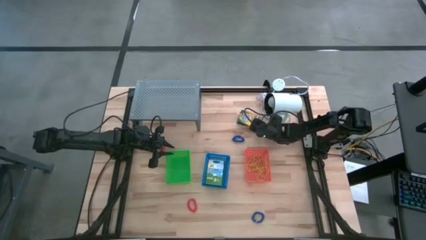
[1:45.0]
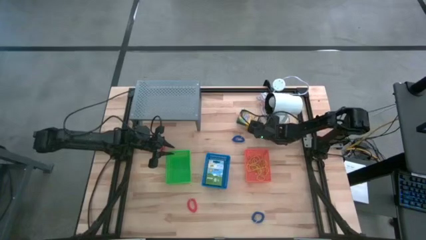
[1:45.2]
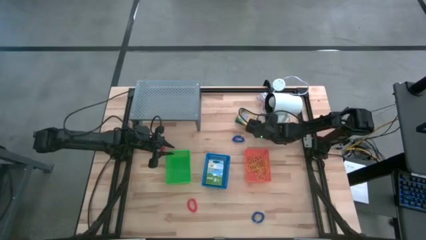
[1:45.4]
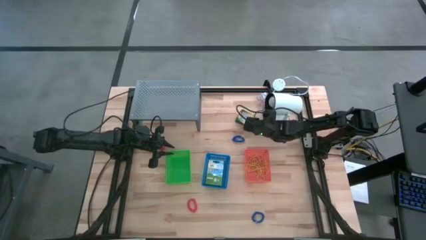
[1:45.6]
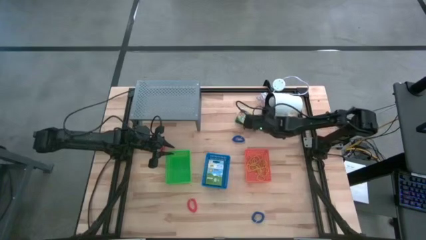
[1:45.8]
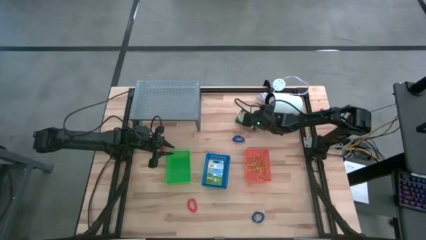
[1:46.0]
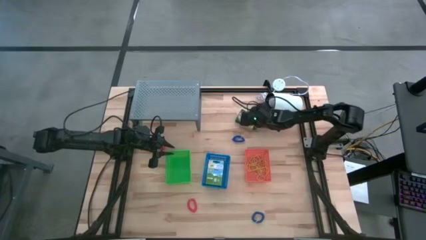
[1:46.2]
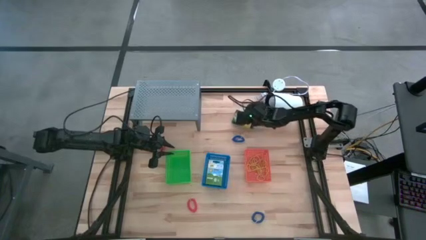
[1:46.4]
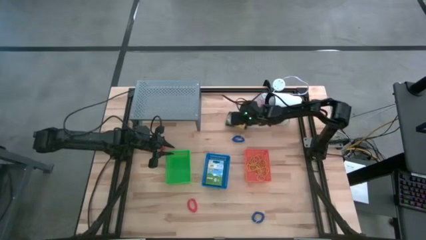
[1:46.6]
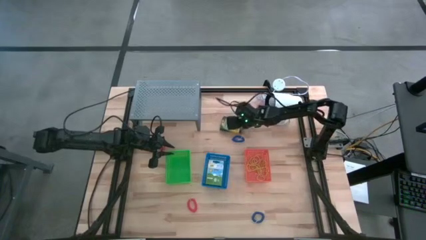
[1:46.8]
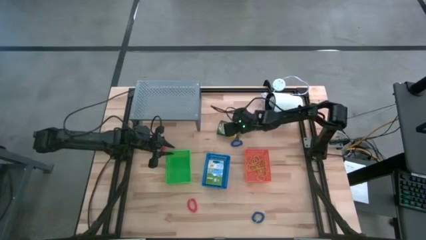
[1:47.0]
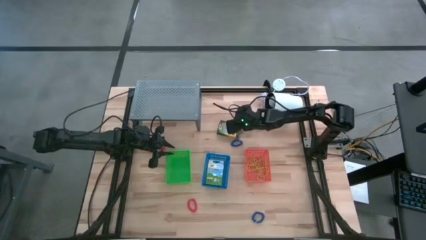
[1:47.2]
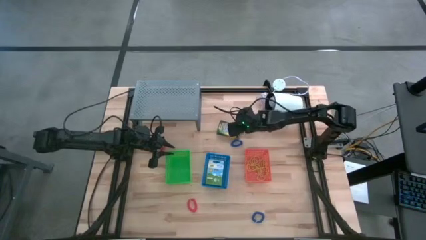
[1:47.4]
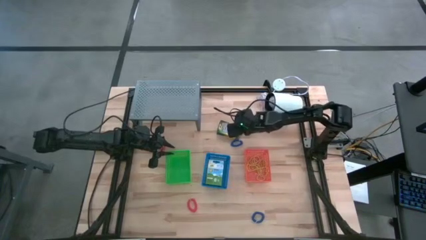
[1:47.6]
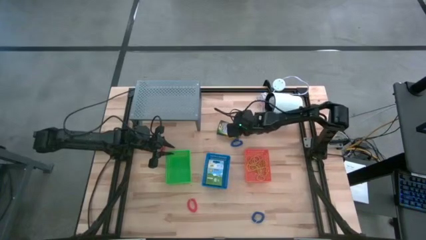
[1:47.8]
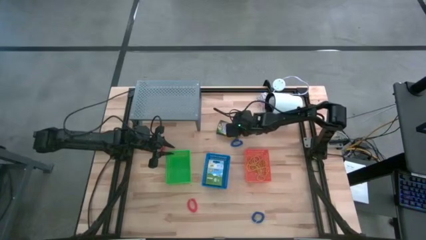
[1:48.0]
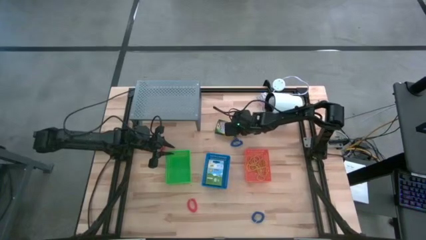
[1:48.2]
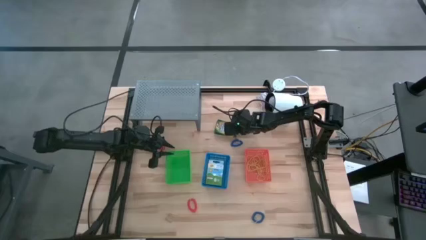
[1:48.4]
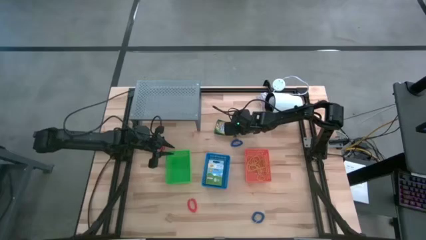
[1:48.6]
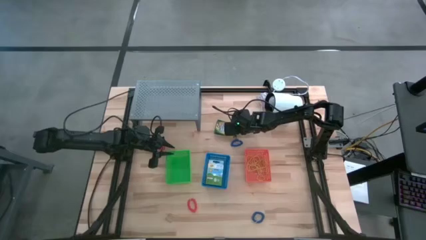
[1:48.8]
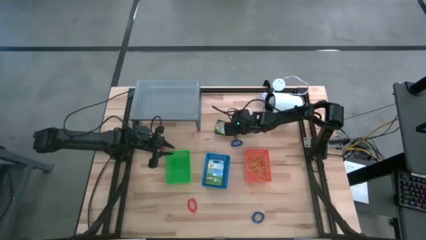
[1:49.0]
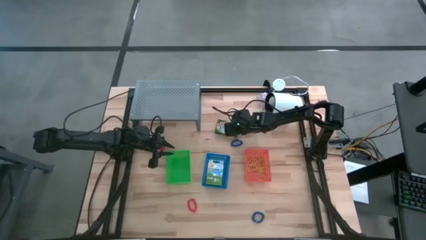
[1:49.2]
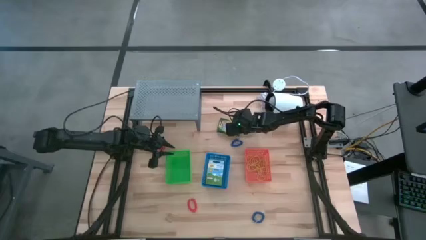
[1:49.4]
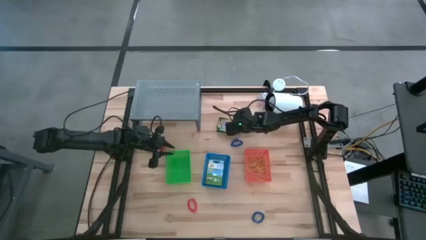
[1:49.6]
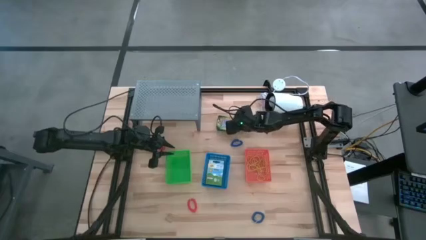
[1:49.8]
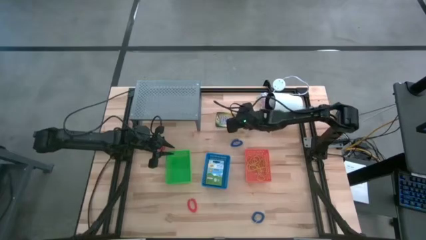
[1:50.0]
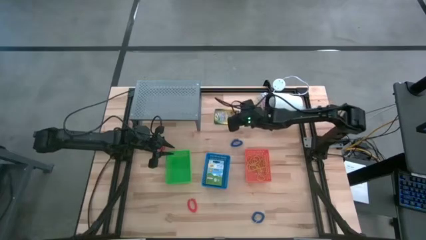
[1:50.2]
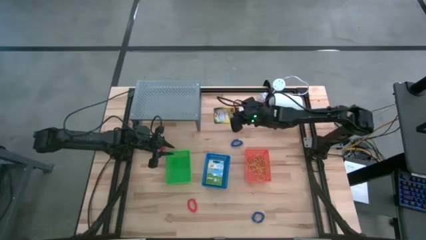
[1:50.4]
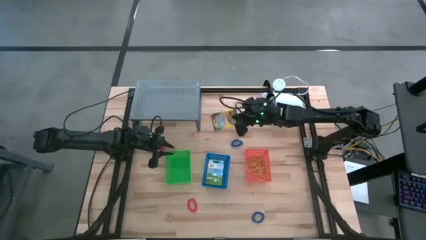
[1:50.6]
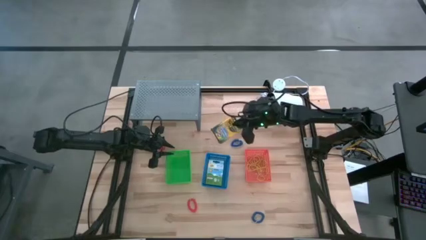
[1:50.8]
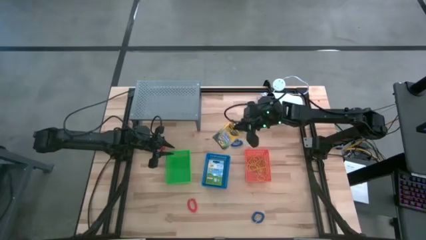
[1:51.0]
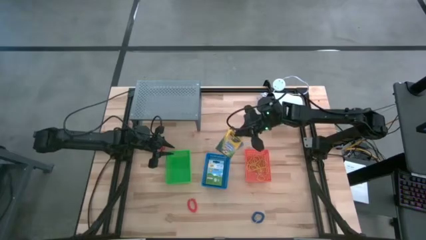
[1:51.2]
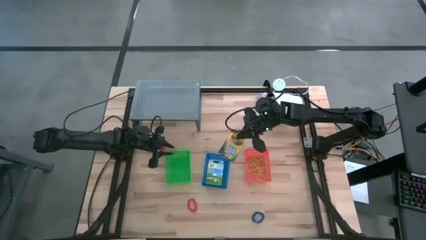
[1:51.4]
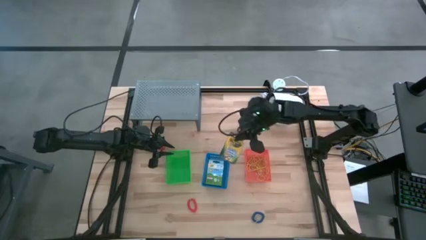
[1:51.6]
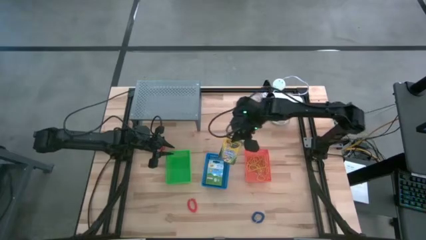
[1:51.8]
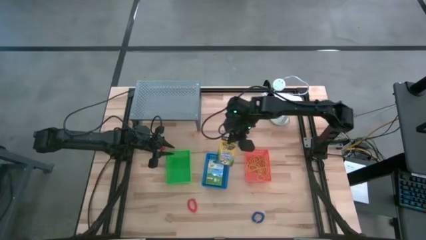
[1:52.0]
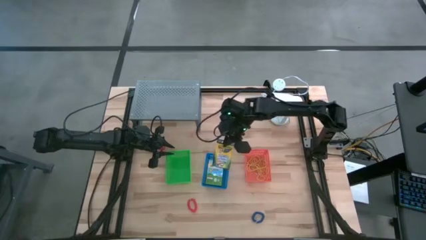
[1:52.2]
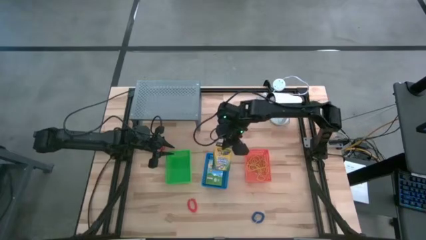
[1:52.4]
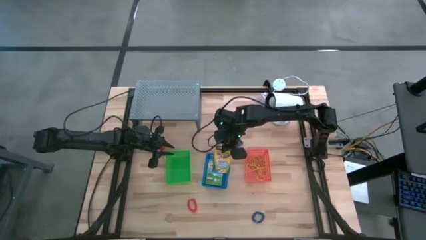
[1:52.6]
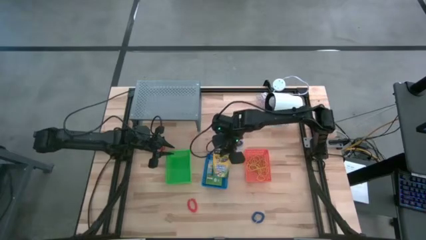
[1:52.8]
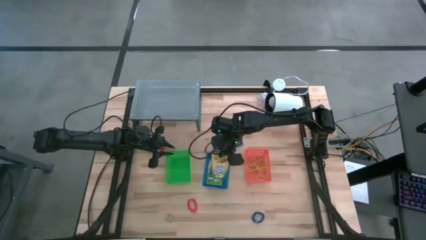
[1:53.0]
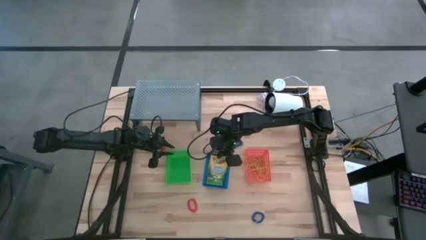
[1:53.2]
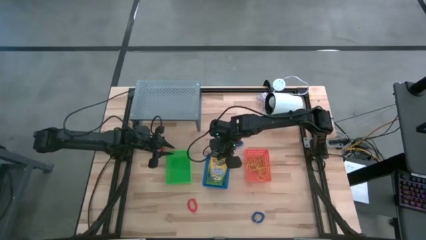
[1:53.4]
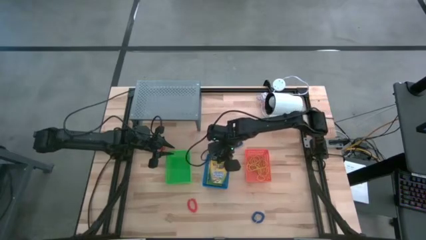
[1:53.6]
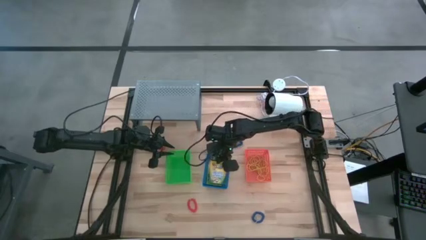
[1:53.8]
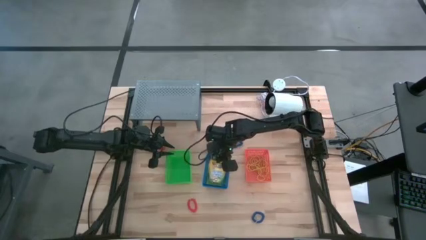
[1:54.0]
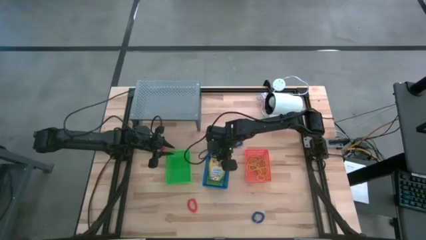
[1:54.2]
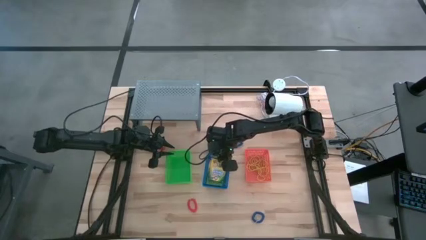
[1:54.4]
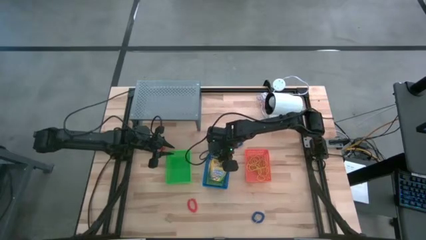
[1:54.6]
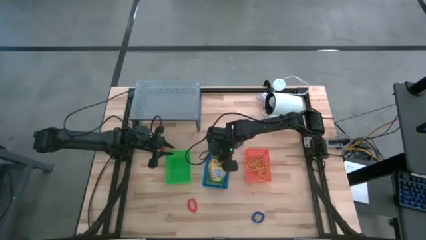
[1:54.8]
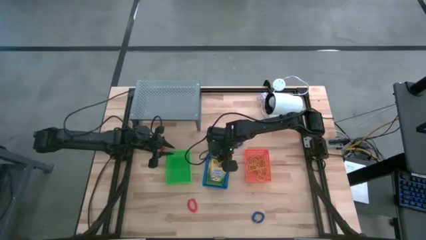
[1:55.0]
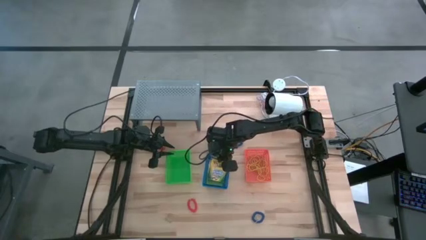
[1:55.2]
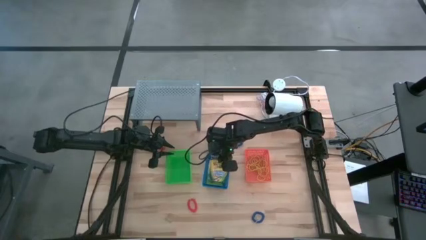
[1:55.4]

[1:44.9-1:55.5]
Task: Pick & Place Office Desk Supplies
Put the crayon box into the blue bin

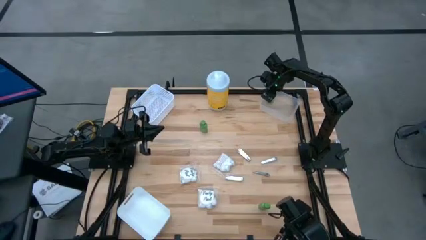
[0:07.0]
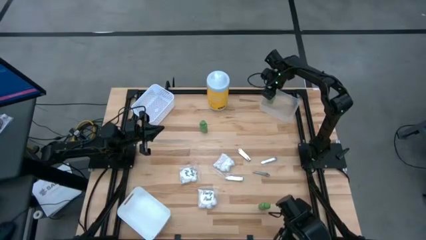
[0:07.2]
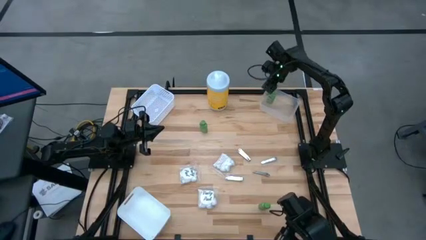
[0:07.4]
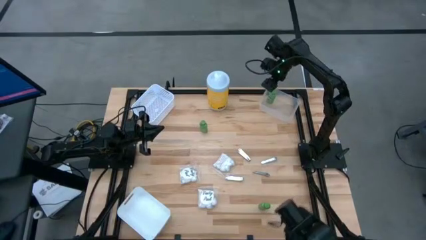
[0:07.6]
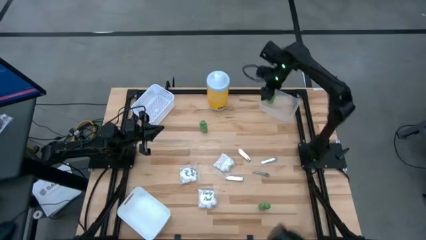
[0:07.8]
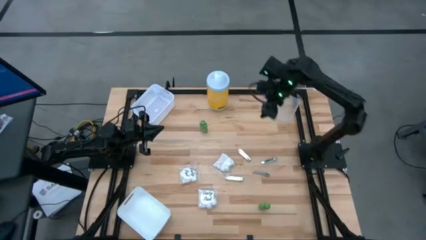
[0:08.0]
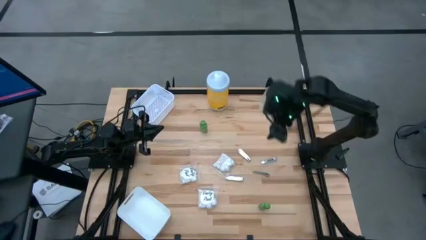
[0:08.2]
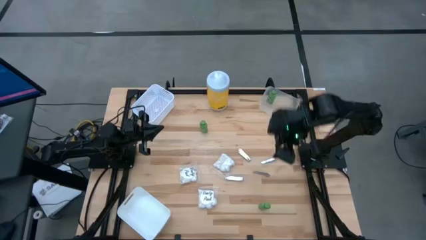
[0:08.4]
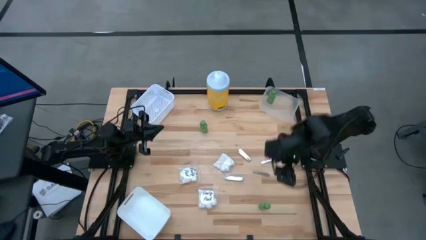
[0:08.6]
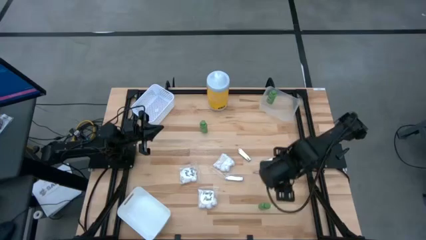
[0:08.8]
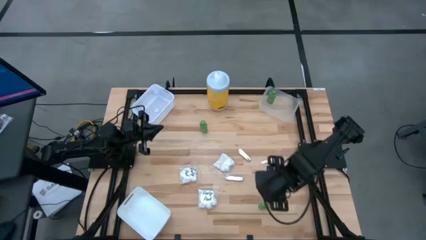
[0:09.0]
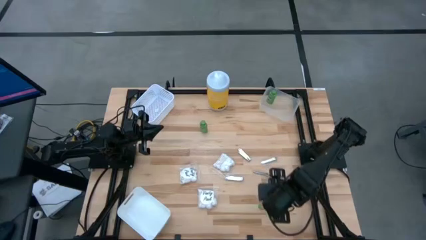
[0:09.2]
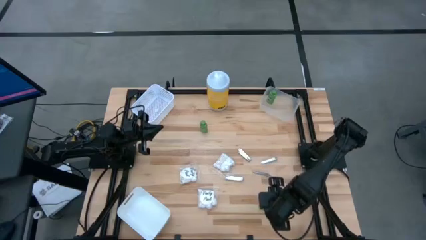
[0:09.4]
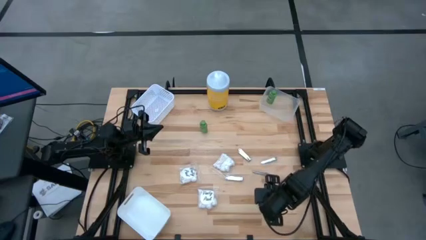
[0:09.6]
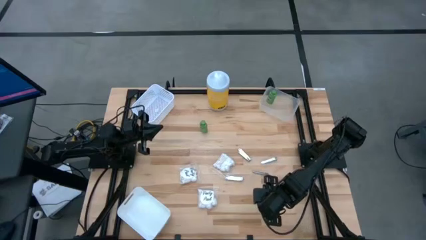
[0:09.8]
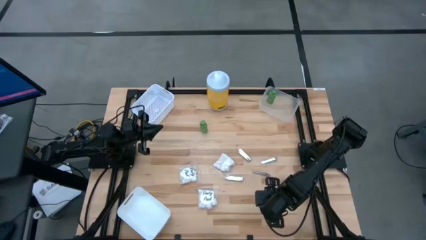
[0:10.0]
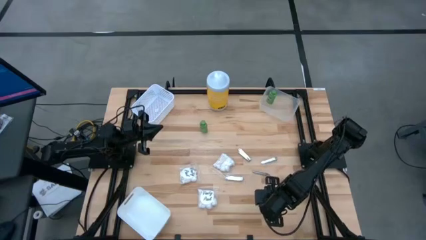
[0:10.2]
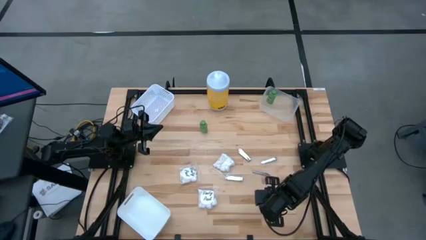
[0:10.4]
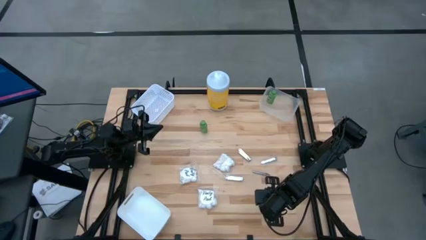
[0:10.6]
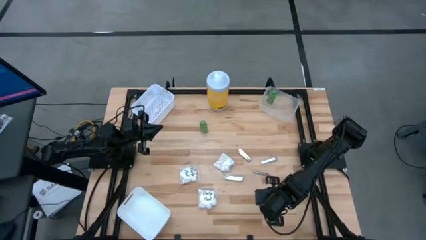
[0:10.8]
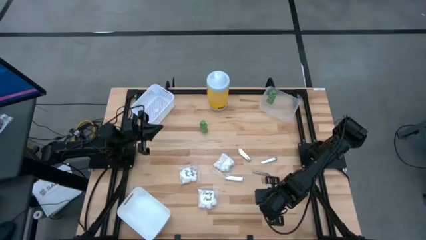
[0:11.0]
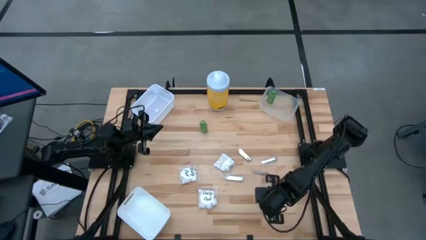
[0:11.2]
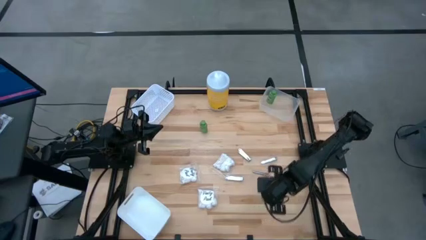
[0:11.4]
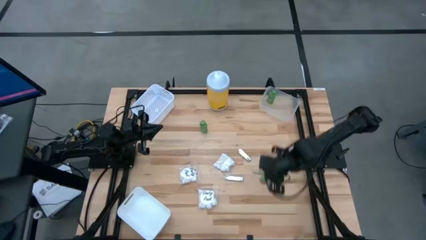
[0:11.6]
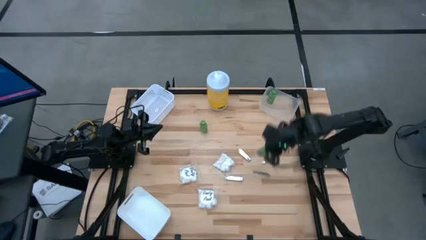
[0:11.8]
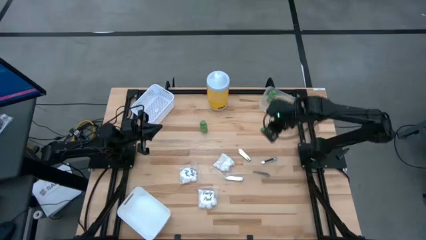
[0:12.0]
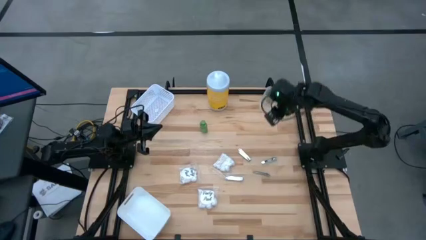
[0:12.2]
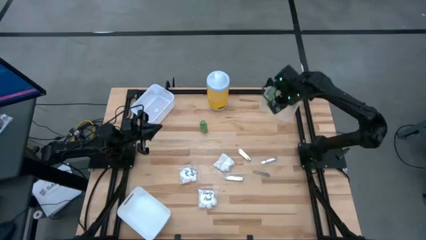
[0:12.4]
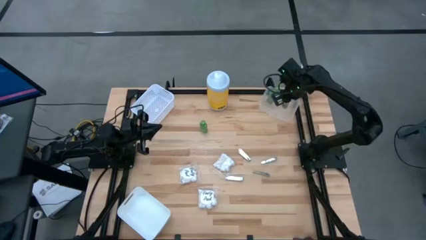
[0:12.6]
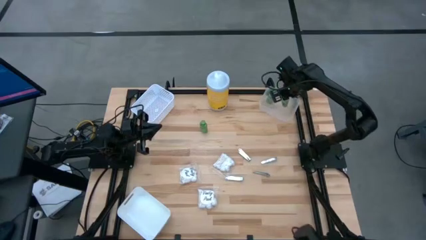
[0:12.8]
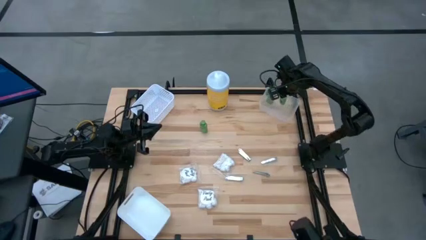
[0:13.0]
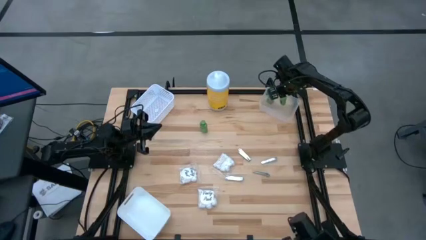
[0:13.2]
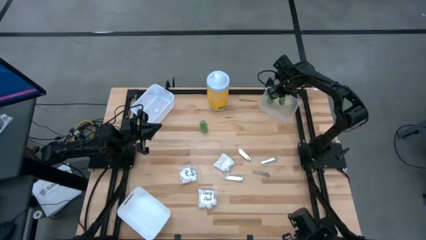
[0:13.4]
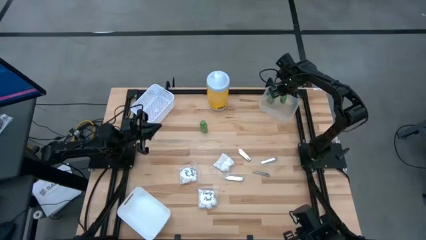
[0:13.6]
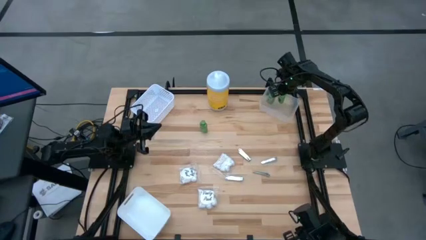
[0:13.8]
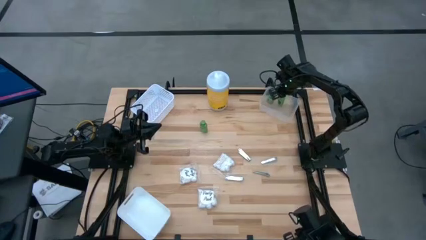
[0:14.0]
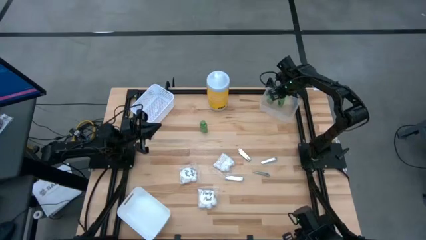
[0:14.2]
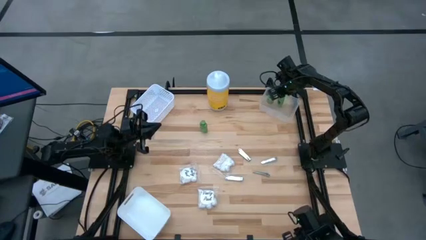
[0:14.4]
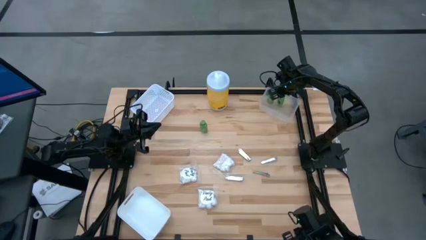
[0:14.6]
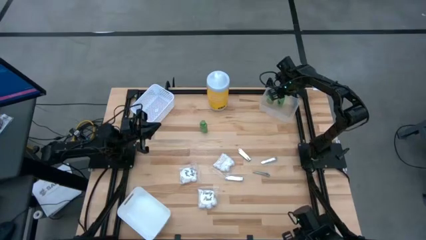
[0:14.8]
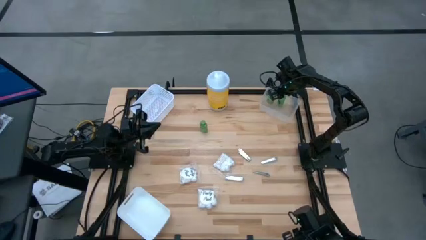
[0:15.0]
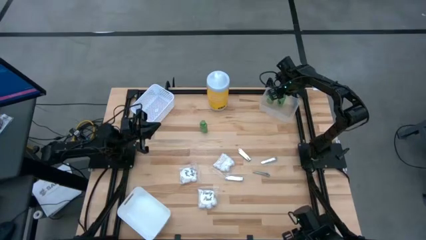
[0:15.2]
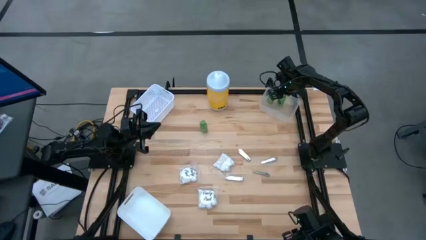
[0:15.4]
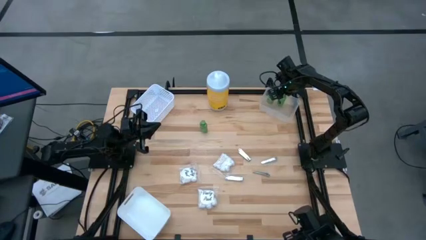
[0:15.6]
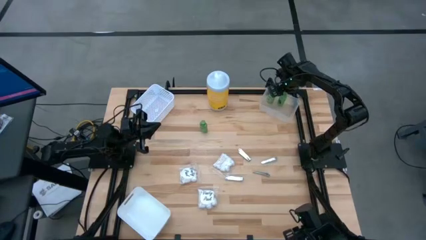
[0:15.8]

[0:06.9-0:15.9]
Task: Pick & Place Travel size toiletries
Put the green shampoo into the transparent bin
